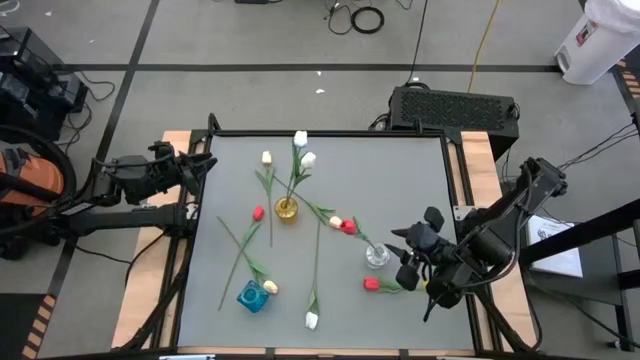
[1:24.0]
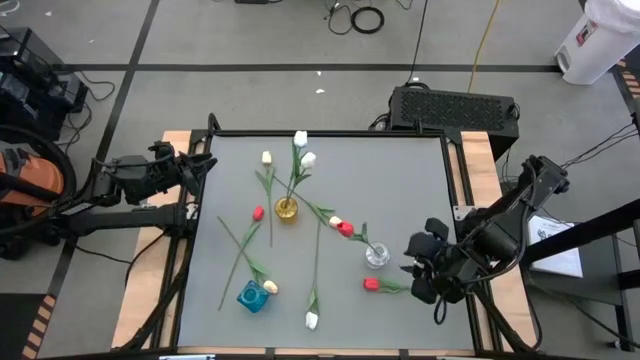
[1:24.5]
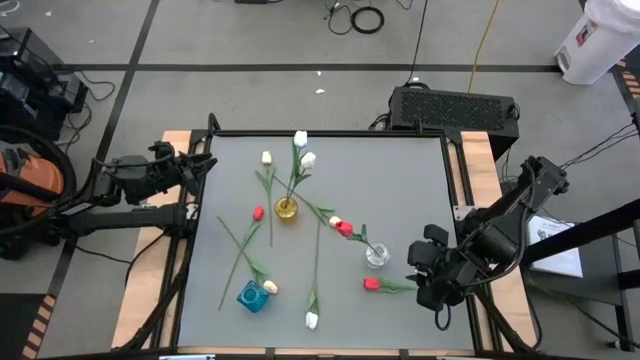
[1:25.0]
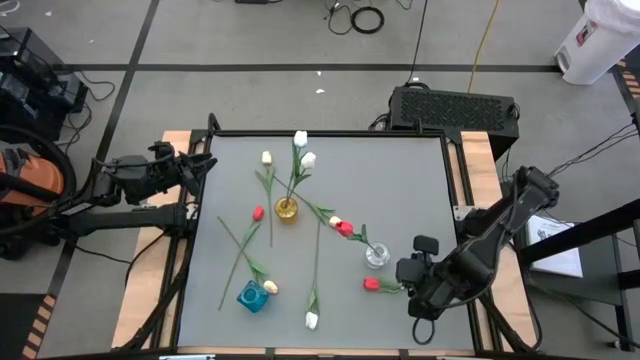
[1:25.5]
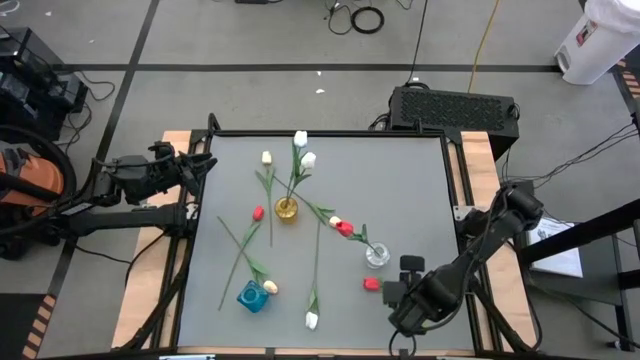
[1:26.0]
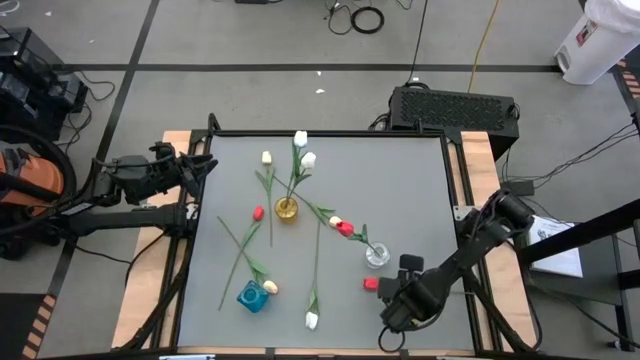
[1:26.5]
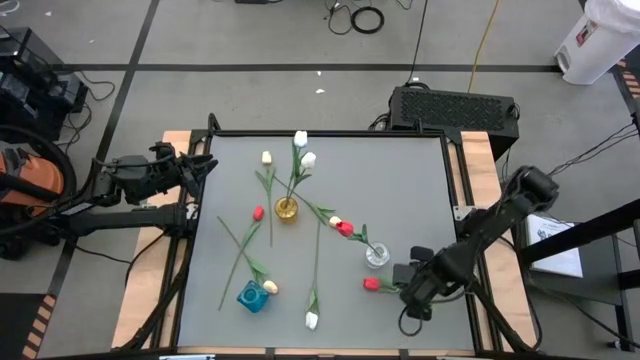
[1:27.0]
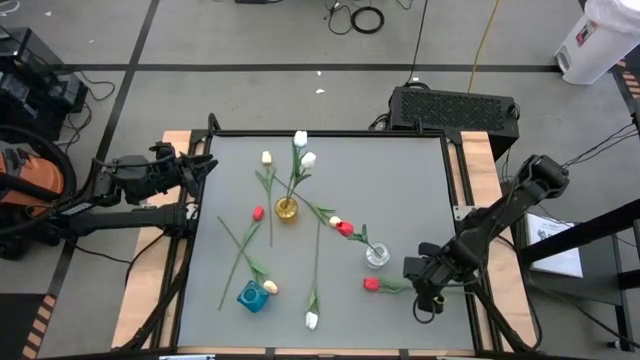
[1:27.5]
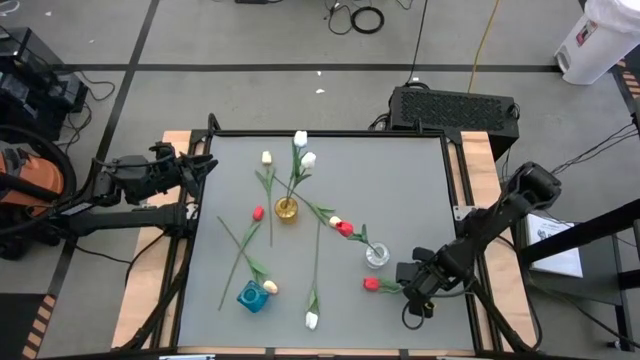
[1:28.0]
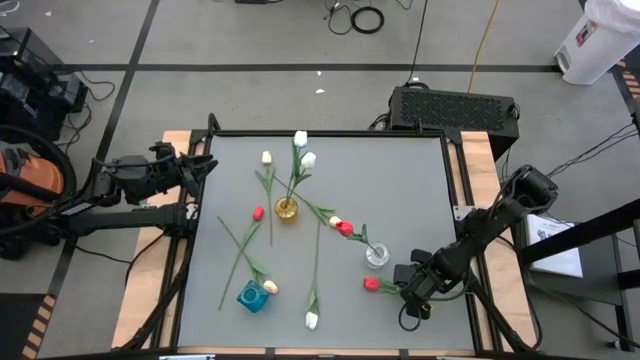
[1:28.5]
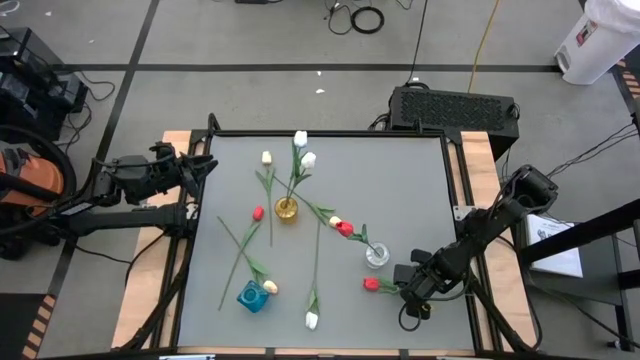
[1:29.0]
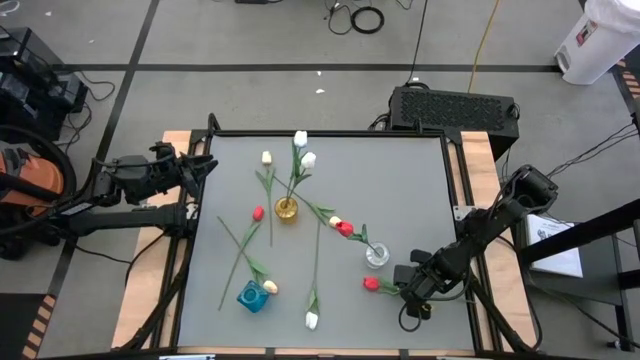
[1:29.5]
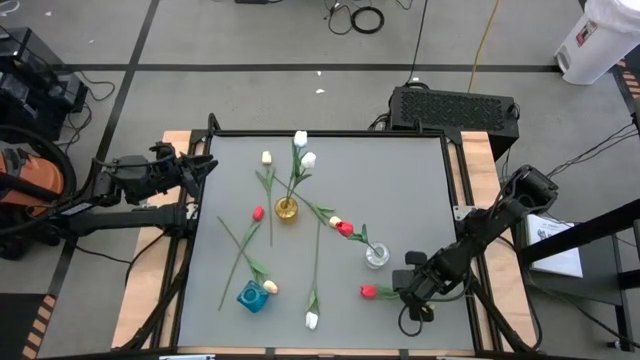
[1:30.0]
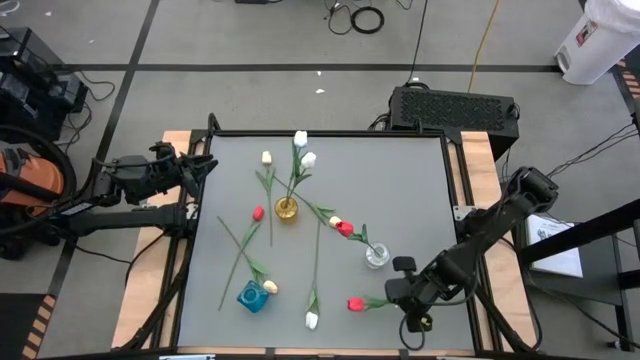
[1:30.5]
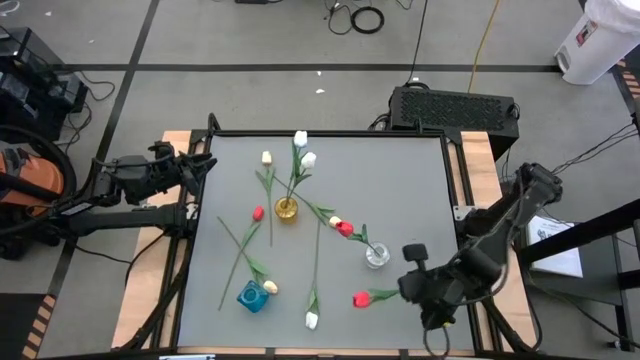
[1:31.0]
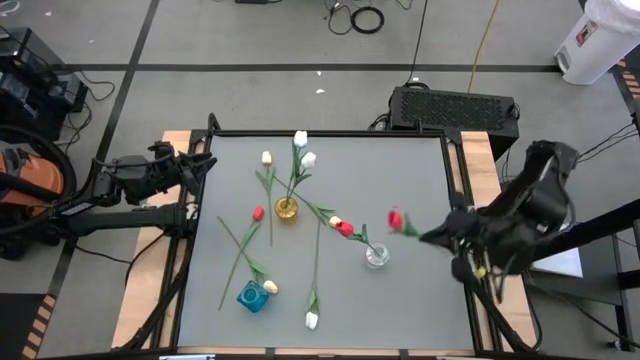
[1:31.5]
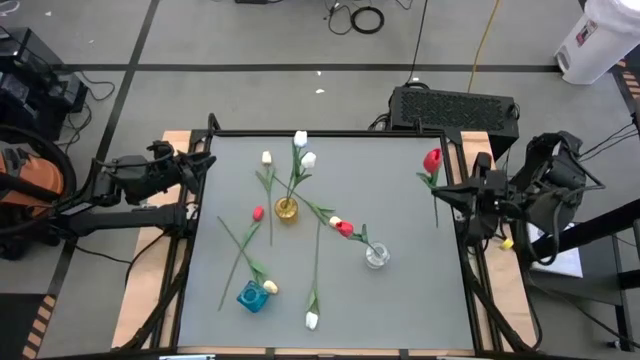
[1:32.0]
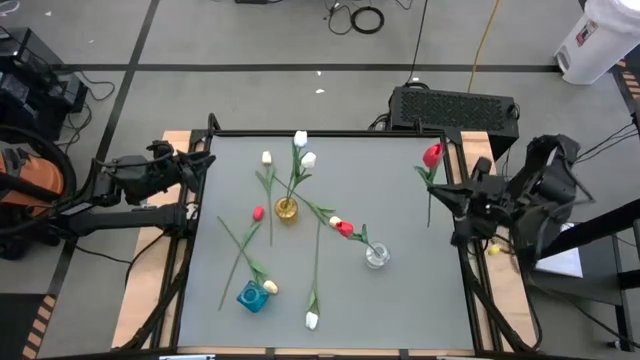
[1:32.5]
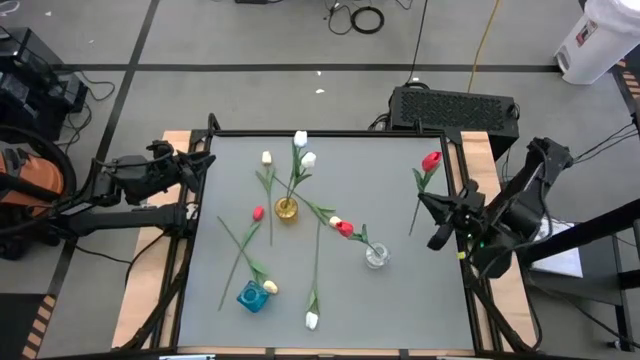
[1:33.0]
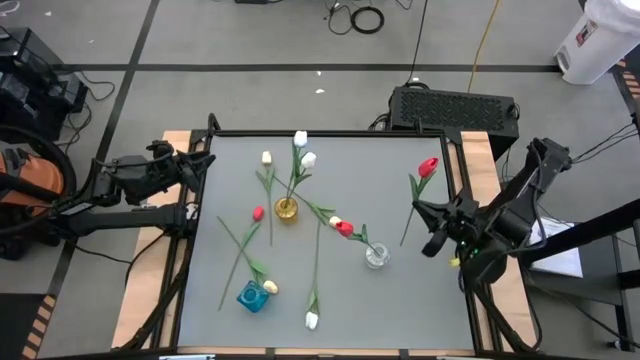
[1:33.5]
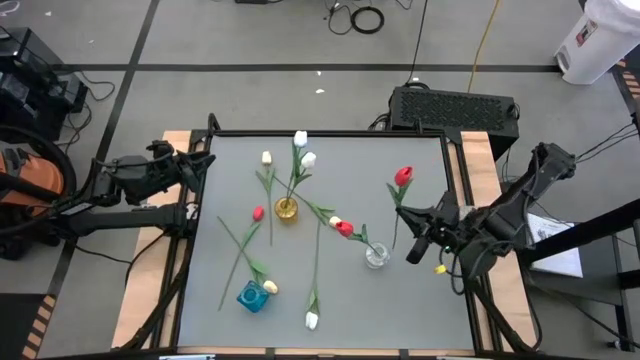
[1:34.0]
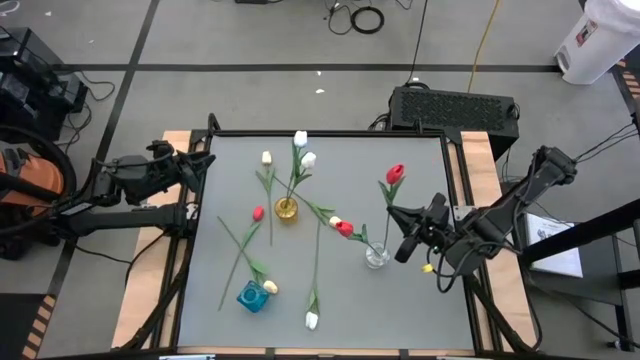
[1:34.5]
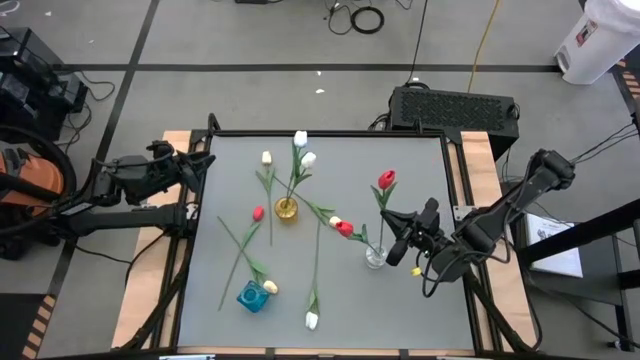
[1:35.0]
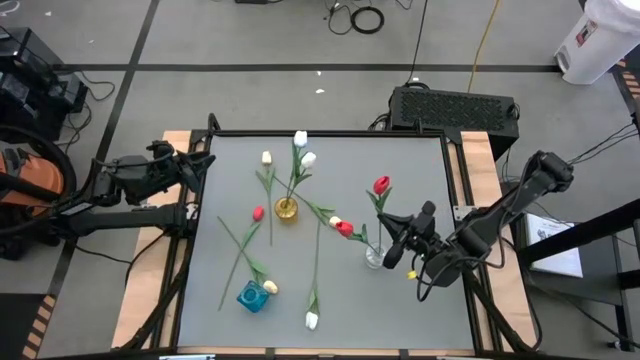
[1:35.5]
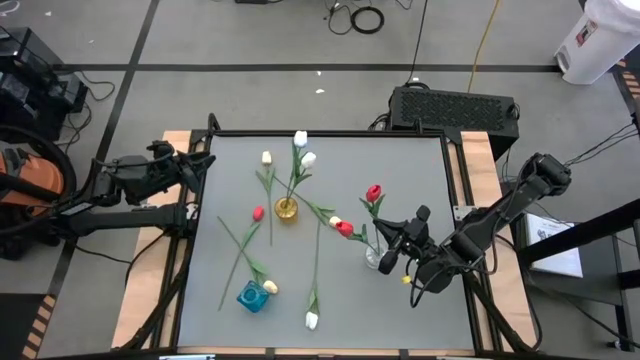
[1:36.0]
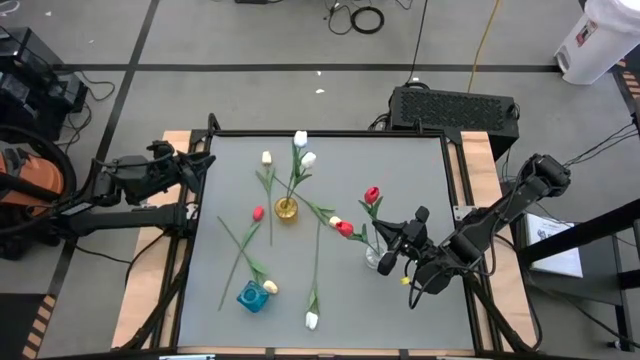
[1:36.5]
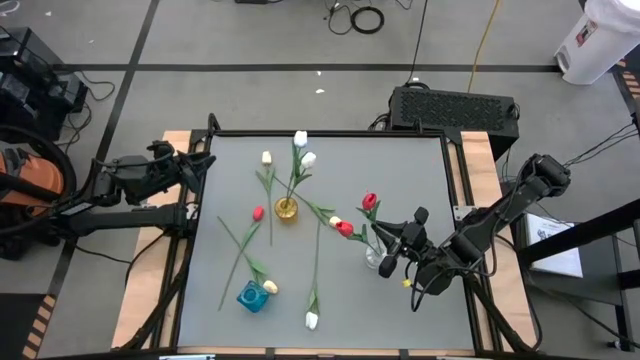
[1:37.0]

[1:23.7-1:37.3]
Task: Sort flowers into vase by color
Put the right red tulip into the transparent vase

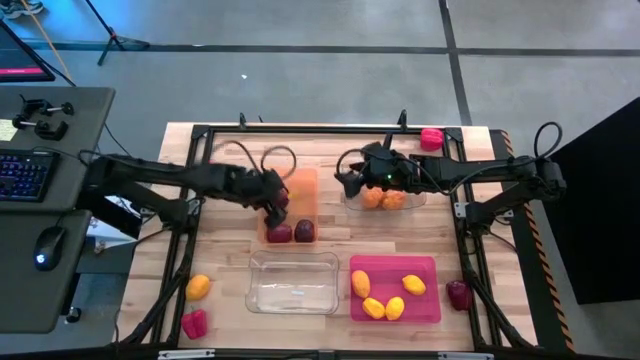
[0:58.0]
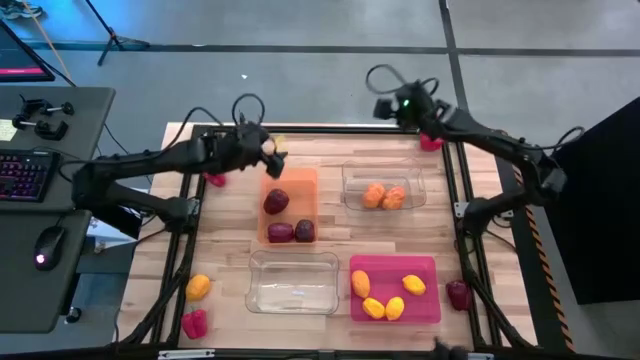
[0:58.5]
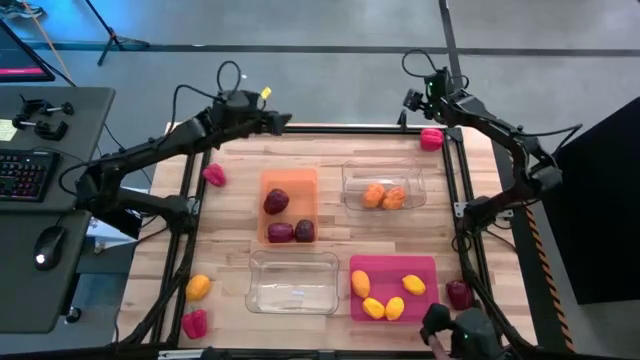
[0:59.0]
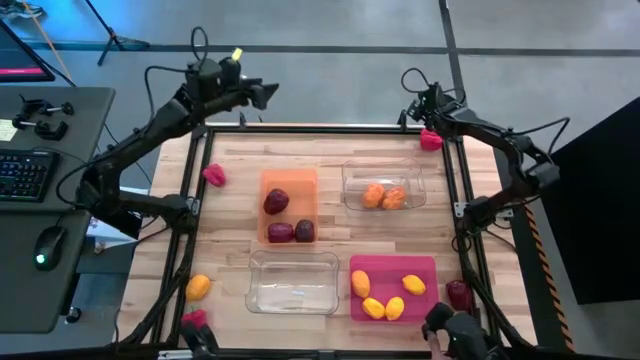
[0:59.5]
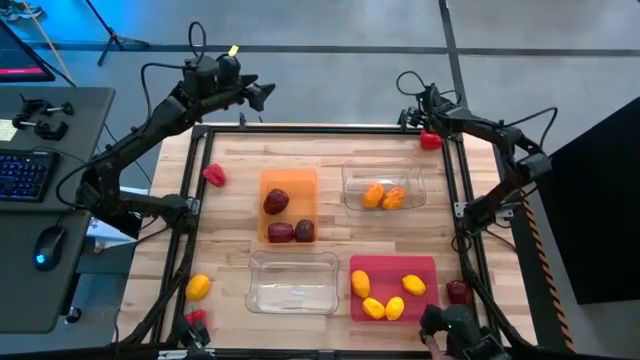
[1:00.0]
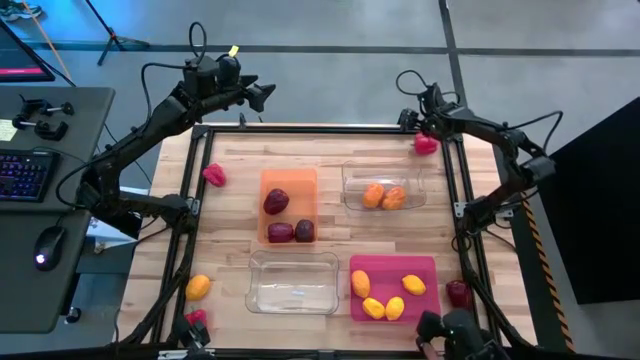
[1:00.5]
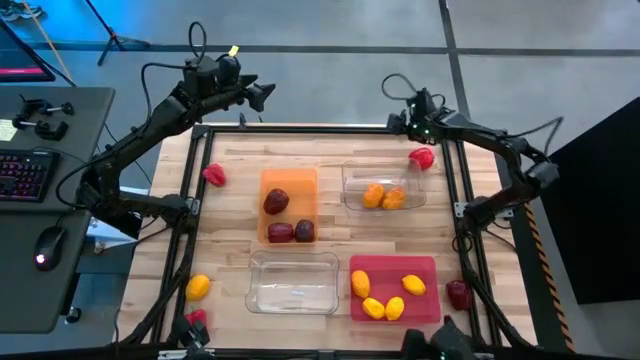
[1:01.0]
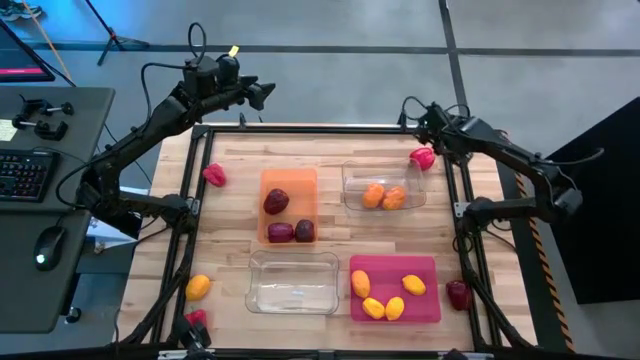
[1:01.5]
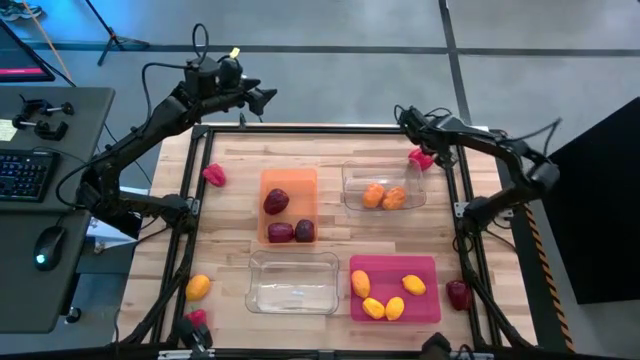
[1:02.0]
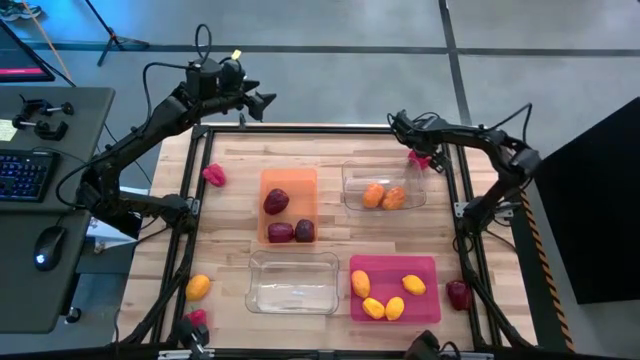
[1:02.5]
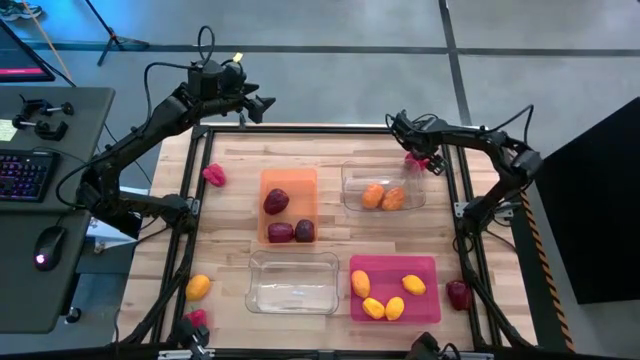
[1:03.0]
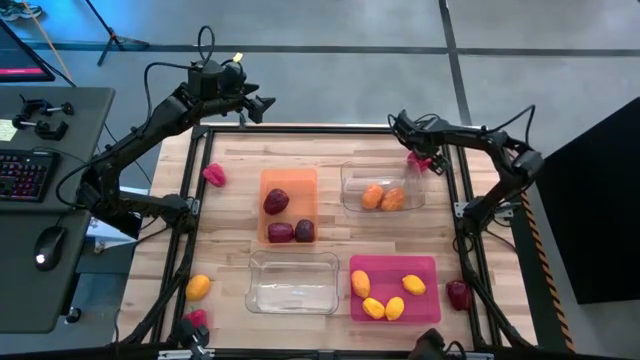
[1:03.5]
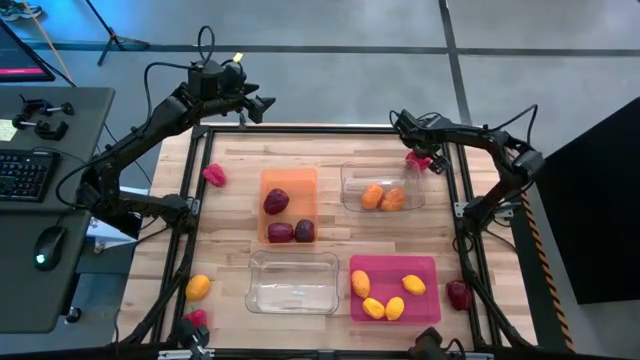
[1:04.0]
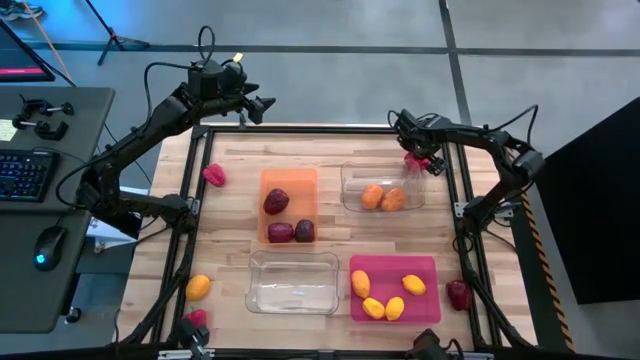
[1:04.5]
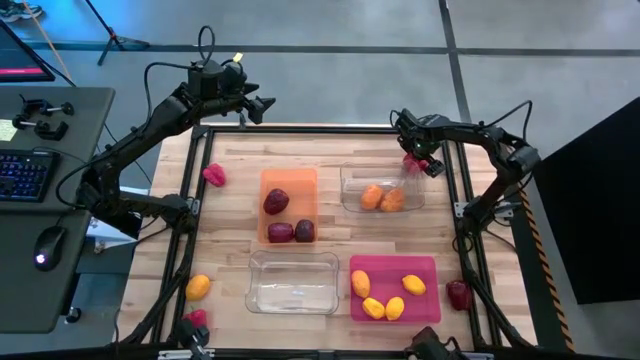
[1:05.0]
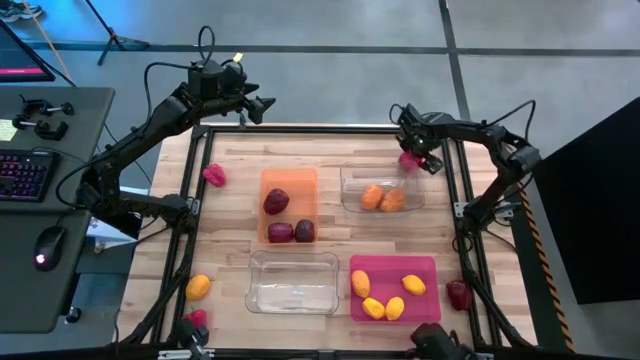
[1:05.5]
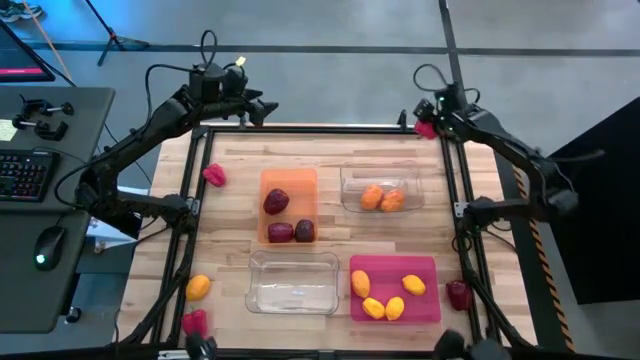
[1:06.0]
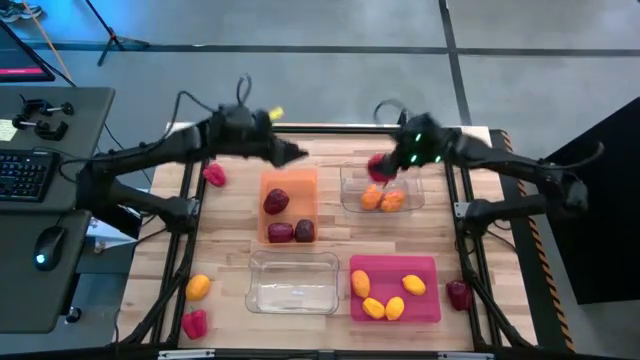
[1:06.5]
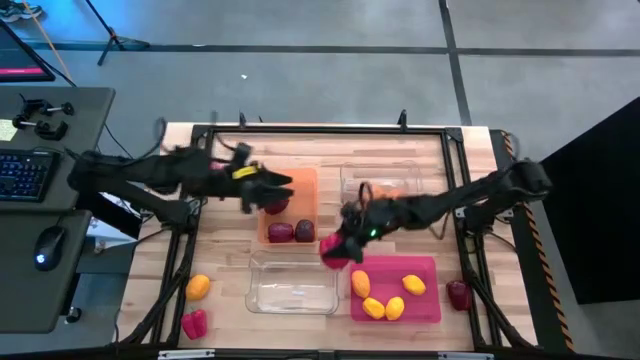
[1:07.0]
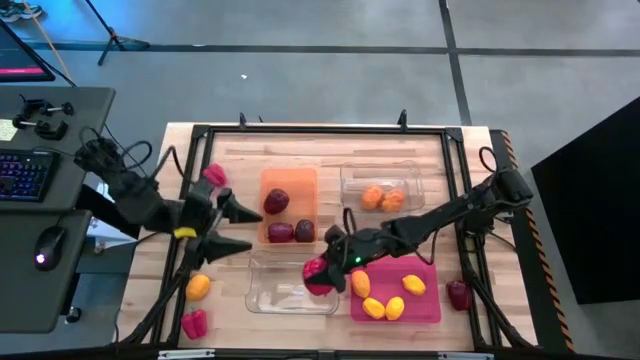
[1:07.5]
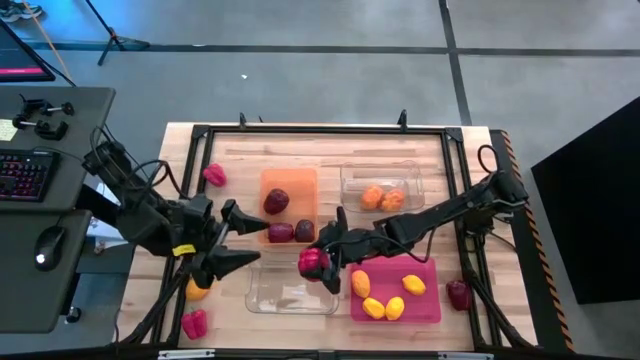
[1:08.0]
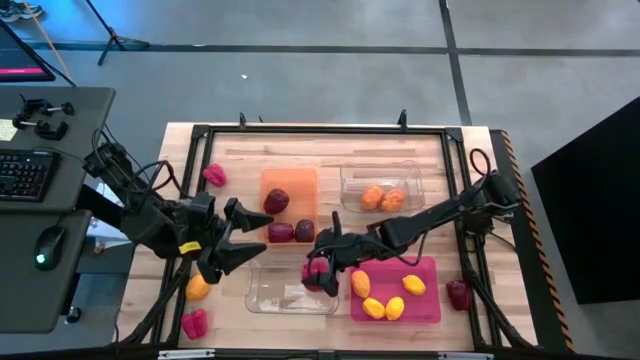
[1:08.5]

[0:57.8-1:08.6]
Task: Sort produce into baskets
Put the top right bell pepper into the bottom transparent bin
